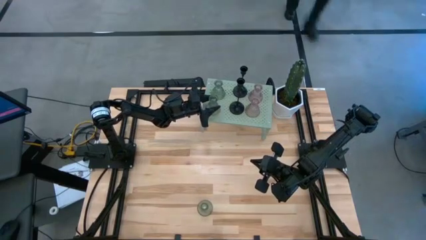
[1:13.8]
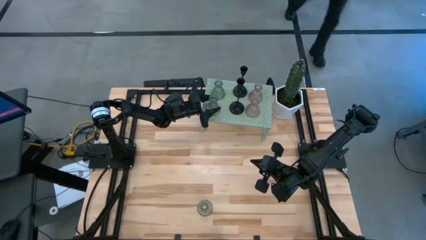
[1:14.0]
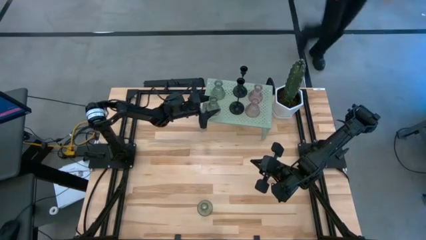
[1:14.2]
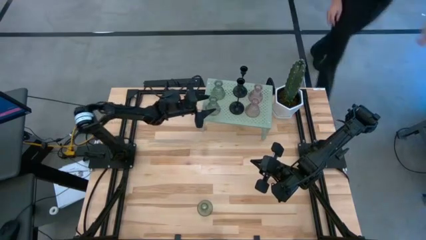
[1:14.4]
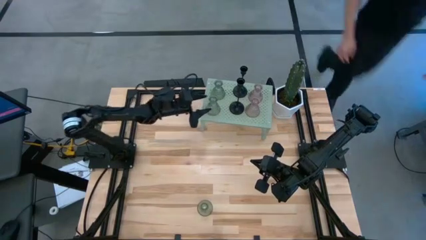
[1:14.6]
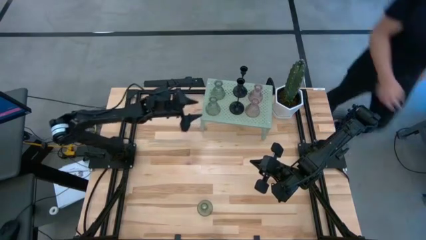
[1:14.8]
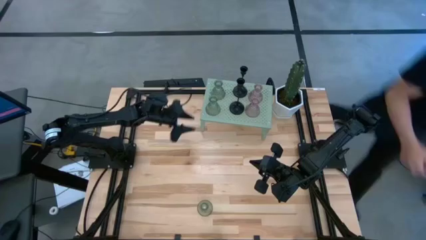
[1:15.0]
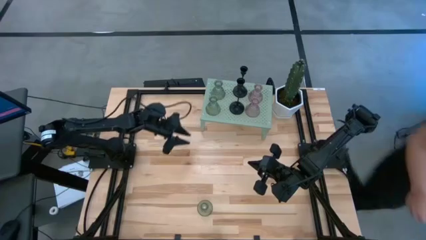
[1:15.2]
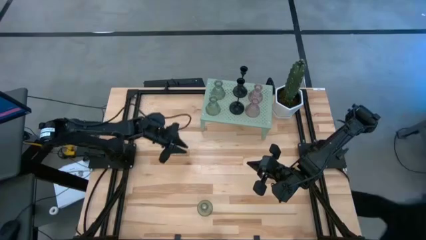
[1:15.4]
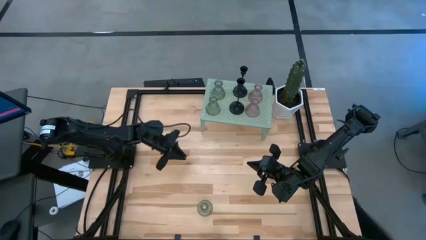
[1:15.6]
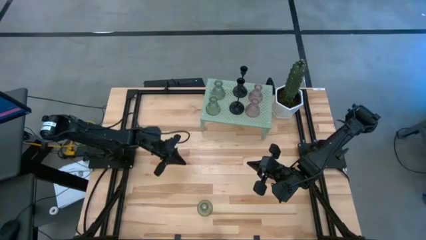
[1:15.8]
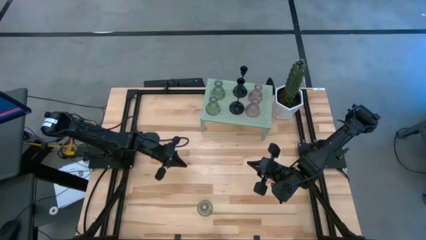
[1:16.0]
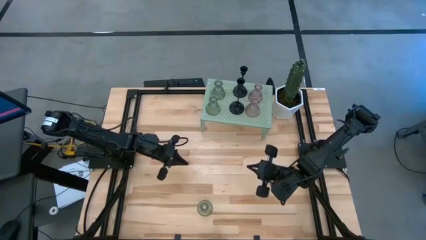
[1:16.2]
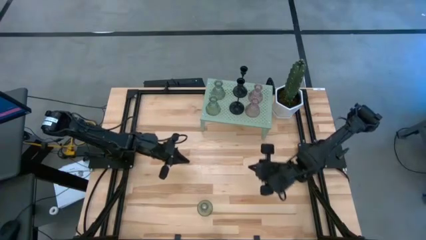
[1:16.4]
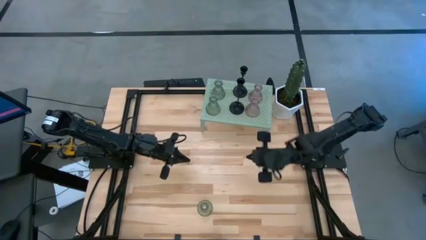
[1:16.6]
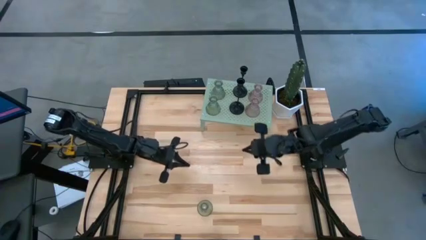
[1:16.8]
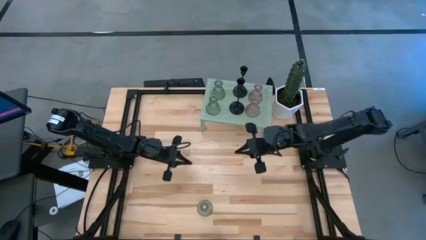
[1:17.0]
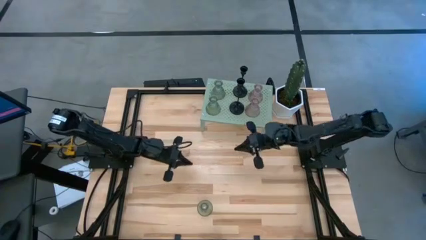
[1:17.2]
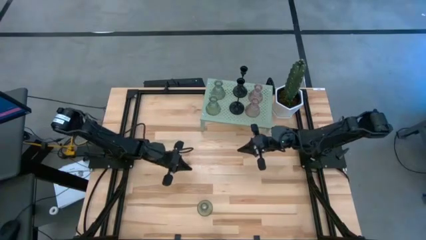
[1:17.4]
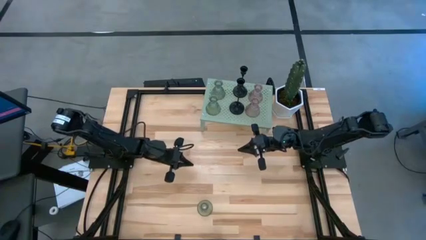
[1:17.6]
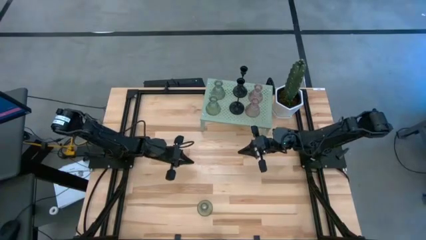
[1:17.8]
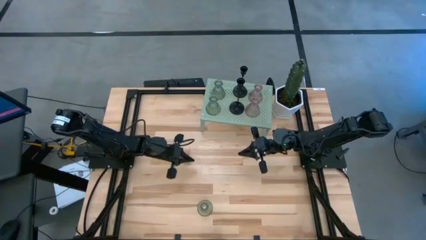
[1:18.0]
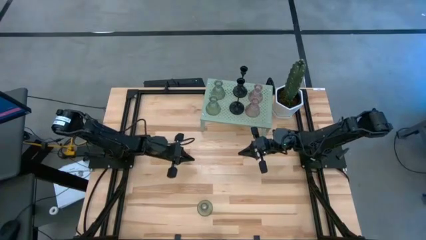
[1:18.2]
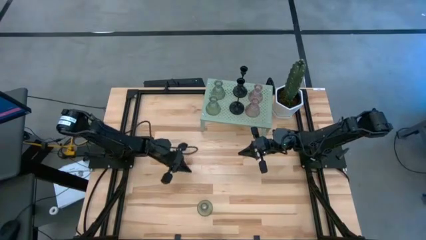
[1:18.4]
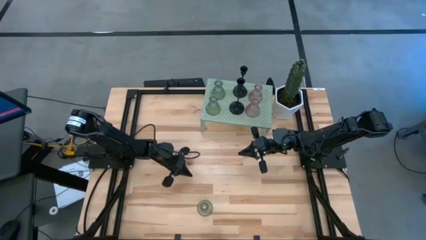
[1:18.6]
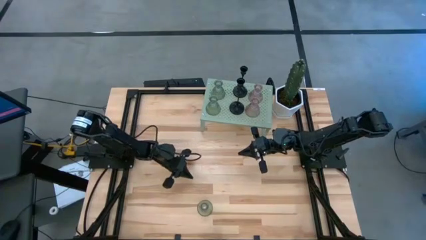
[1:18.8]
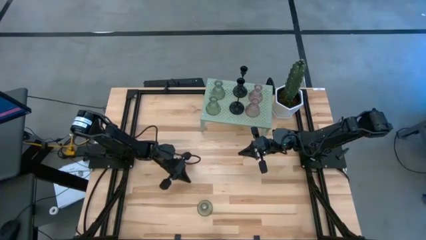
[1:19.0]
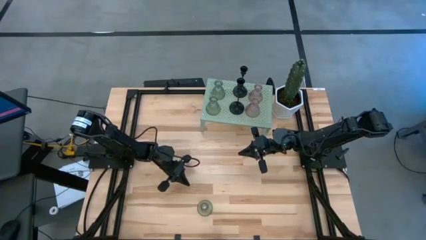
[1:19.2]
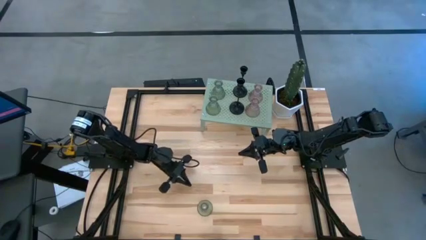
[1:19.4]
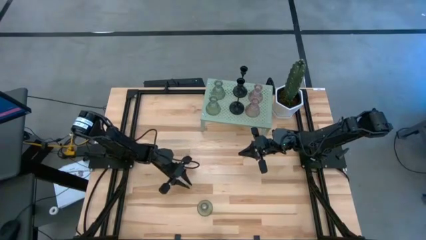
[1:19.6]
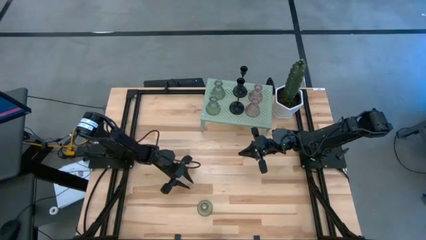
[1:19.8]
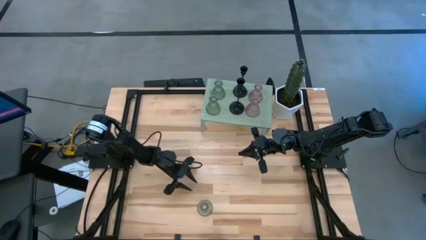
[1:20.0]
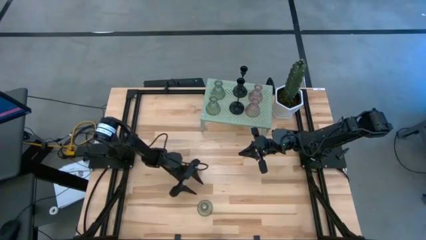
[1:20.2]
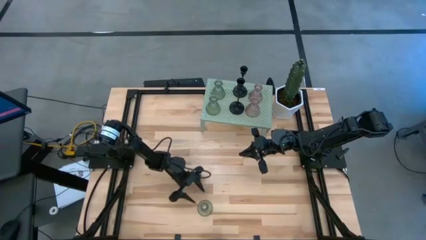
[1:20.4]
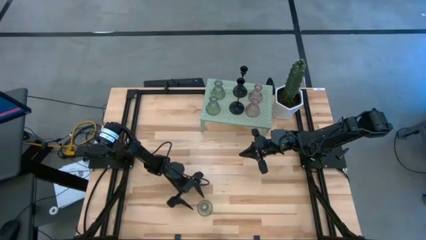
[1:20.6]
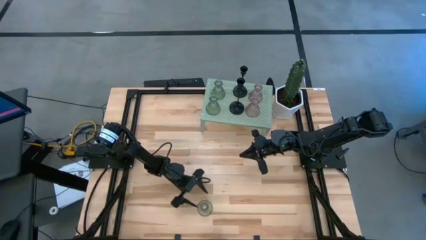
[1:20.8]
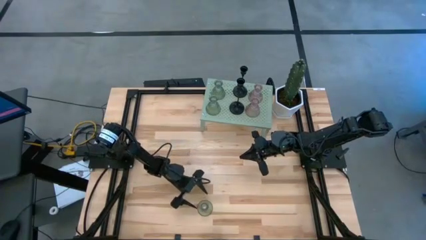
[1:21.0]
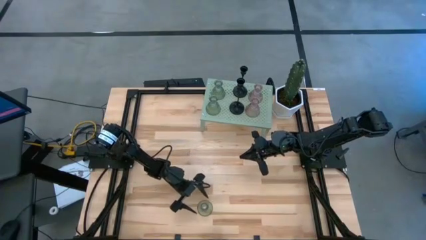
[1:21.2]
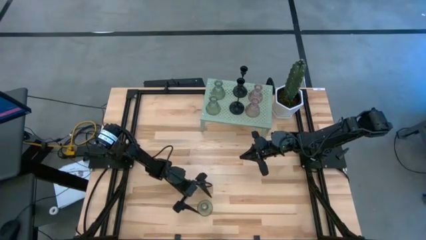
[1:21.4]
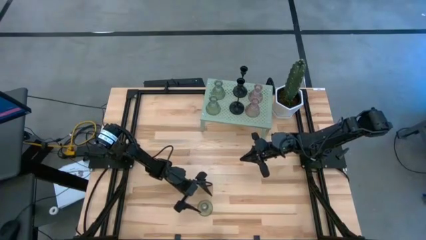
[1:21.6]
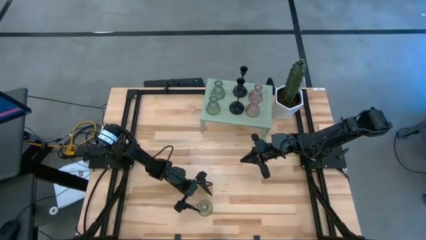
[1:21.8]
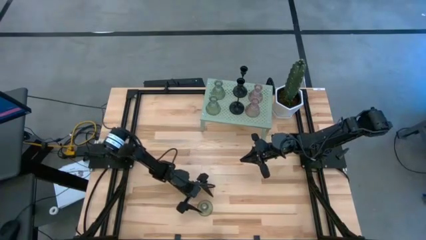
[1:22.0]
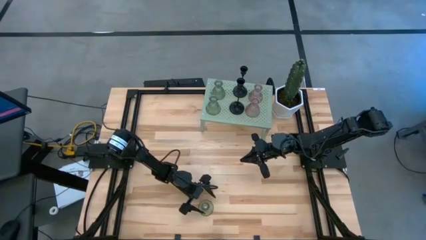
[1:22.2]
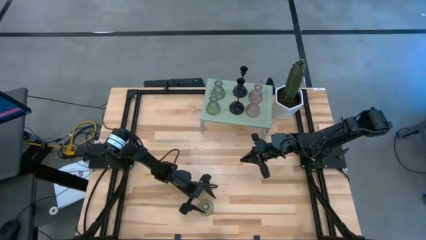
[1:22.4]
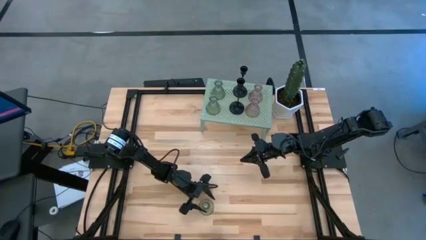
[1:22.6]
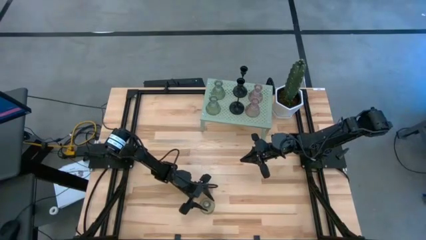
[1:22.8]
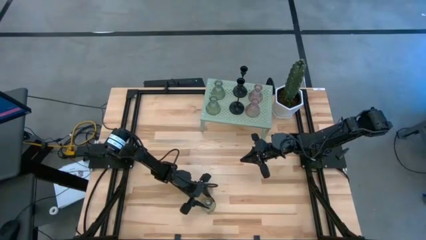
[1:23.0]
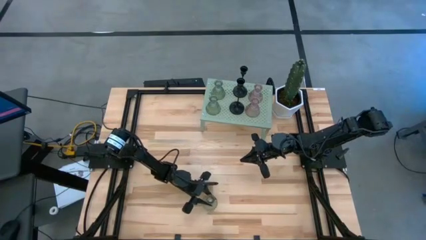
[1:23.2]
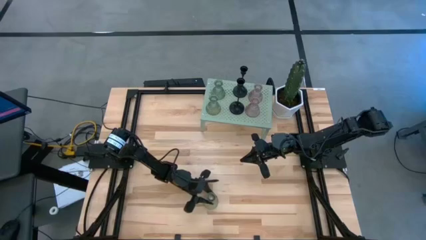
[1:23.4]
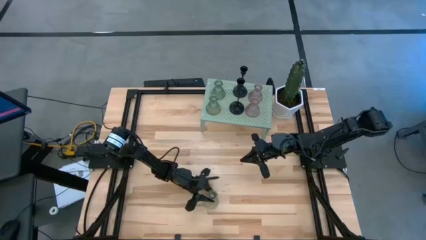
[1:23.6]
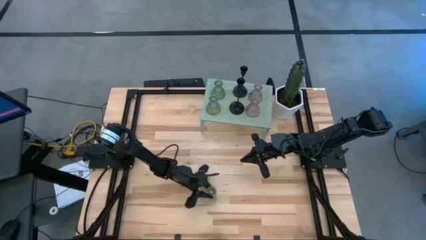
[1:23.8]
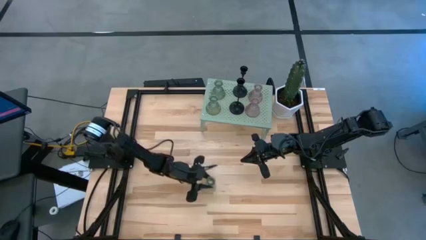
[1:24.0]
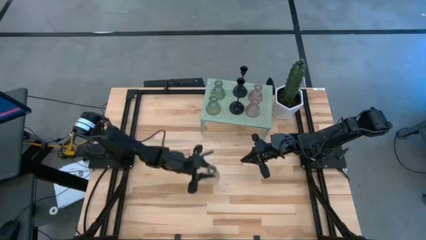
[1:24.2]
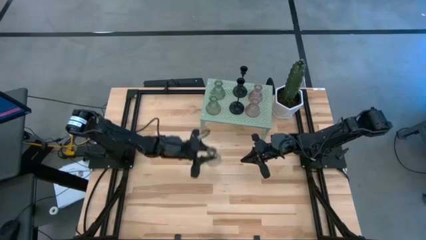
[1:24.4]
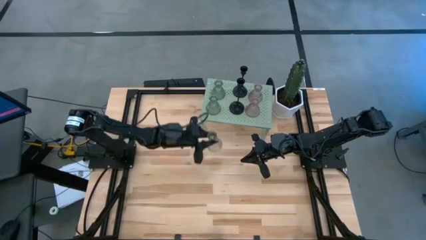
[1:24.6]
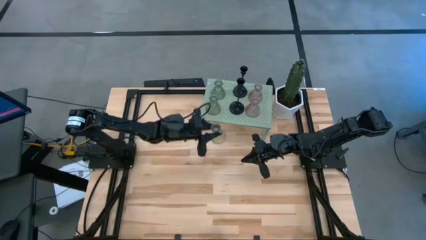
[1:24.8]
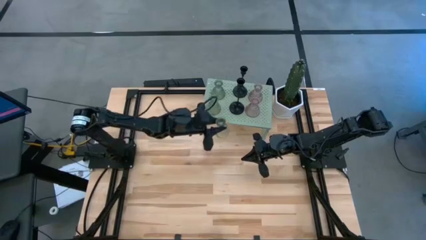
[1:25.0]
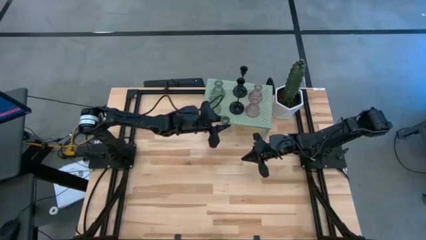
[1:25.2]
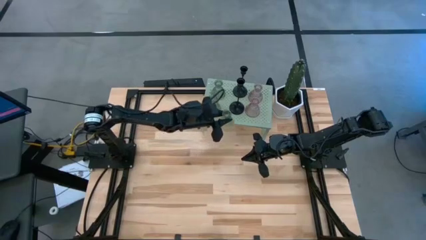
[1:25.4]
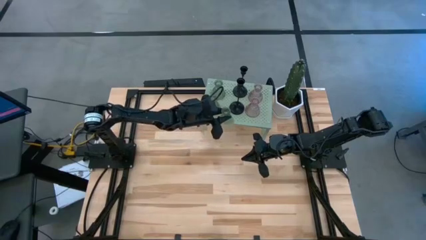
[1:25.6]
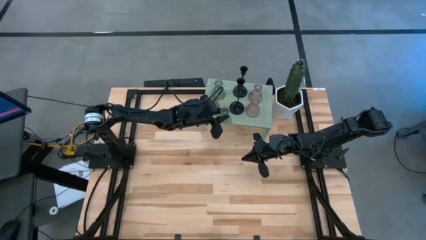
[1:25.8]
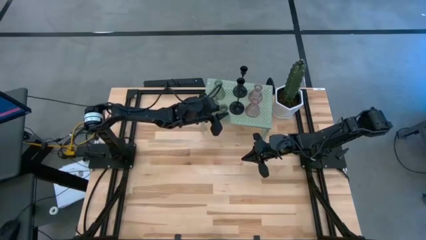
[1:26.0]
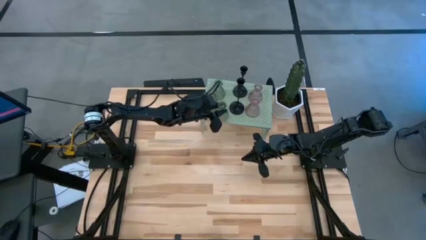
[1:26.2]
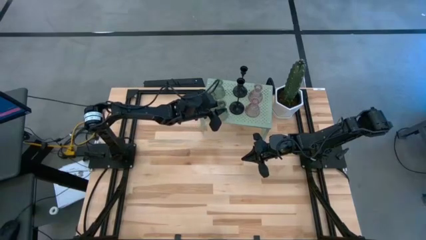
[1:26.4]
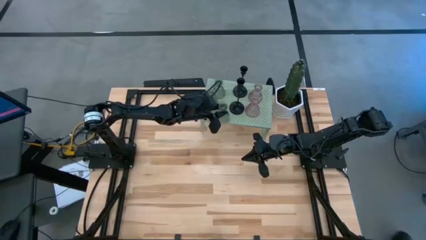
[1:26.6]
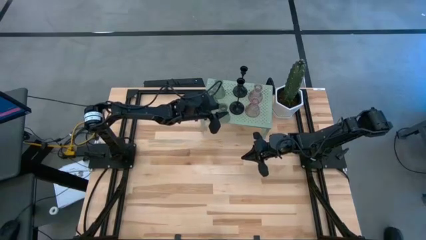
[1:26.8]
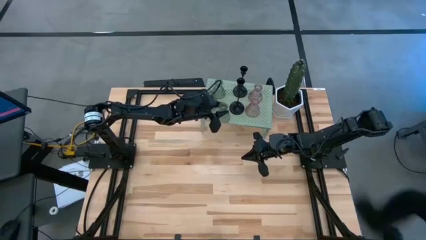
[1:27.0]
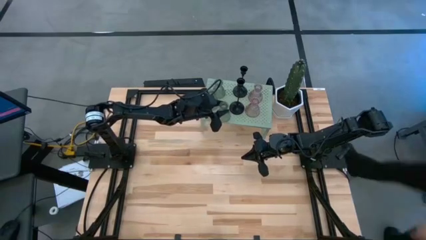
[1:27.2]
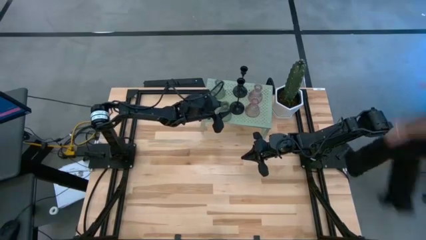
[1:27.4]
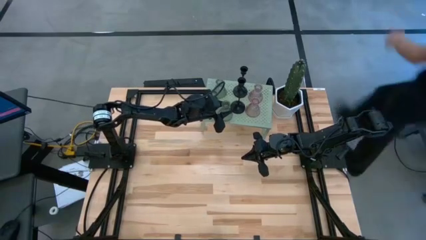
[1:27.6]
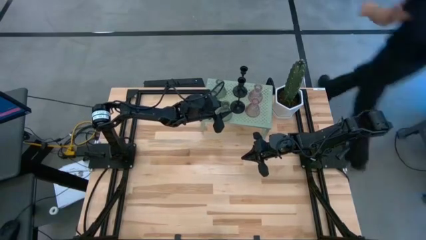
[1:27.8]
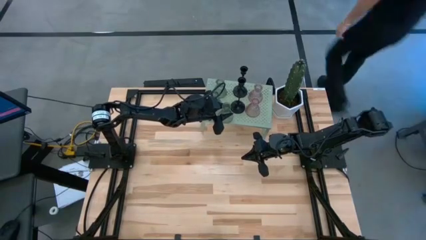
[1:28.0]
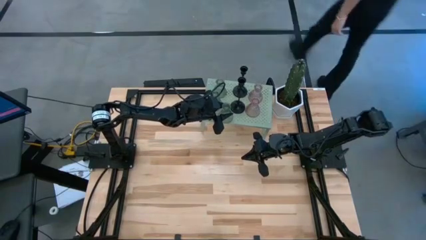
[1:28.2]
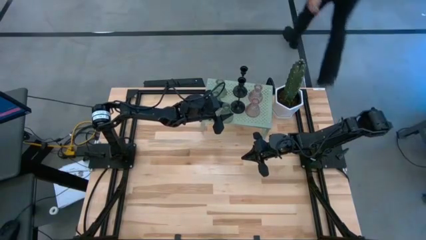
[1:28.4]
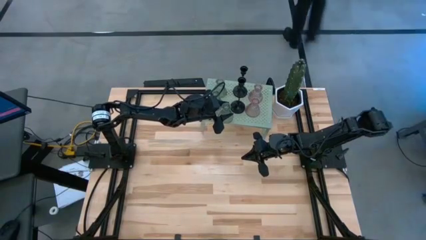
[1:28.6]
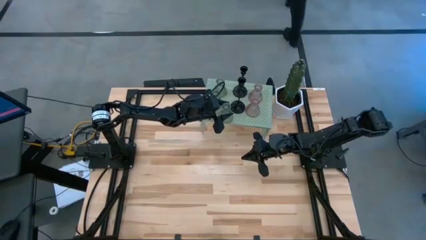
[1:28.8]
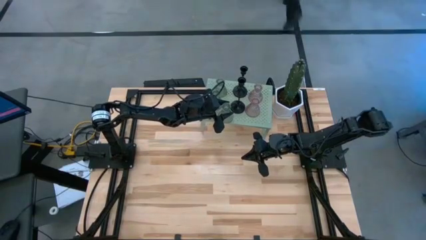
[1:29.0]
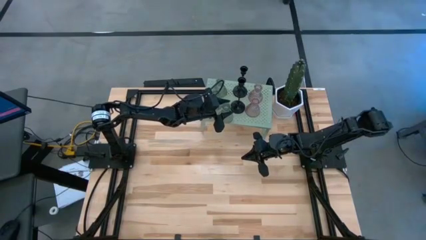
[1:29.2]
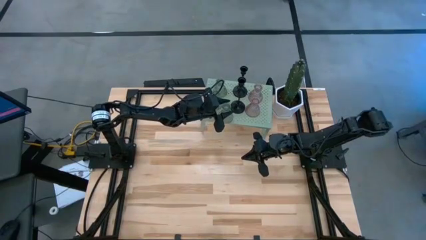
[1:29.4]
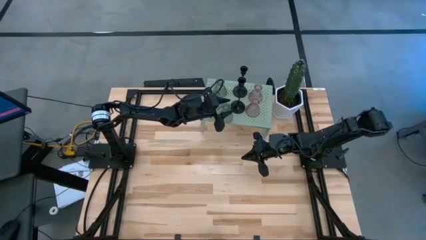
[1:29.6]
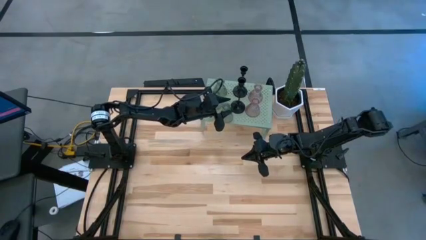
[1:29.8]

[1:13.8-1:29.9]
Task: Pick & Place candle stick holders
Put the green glass candle holder on the shelf
